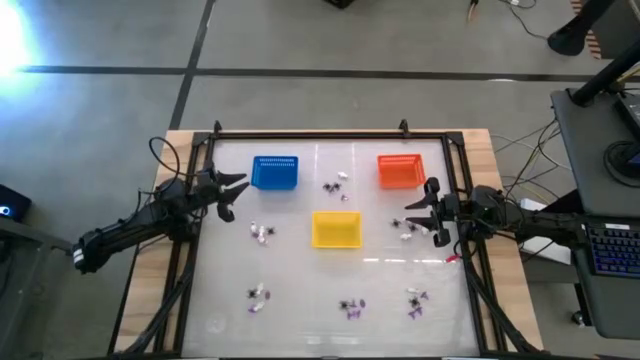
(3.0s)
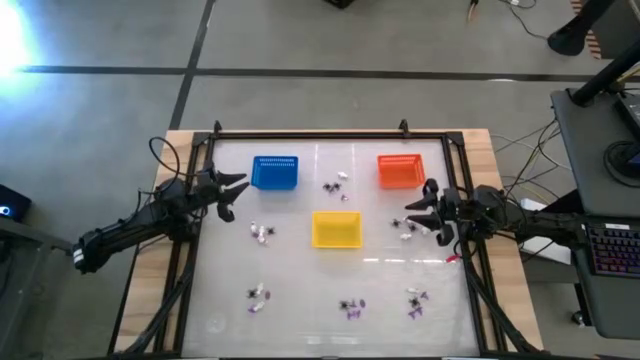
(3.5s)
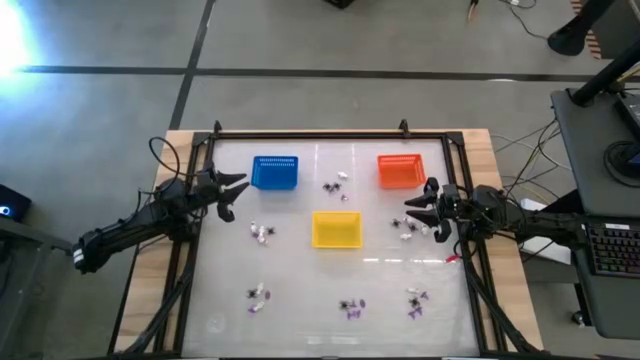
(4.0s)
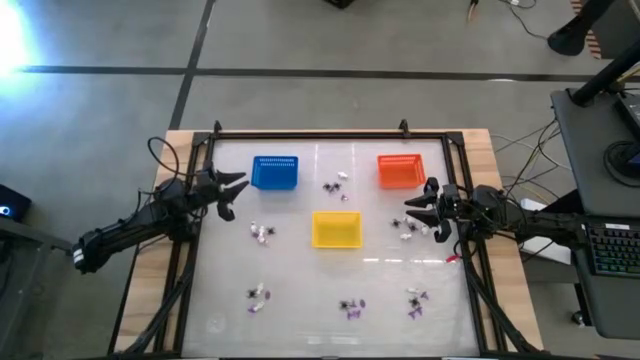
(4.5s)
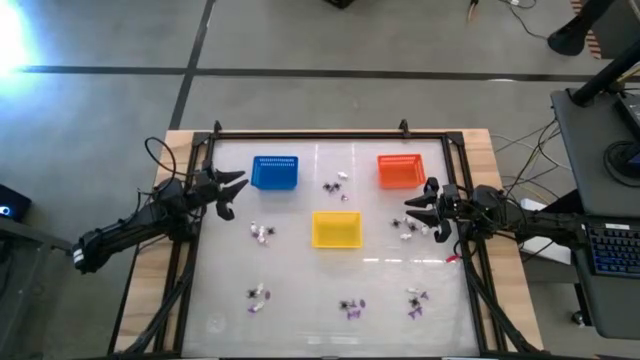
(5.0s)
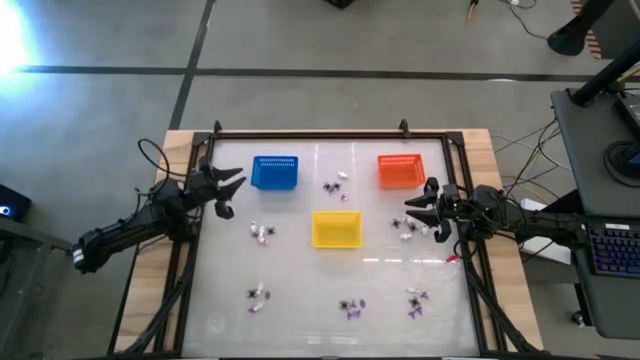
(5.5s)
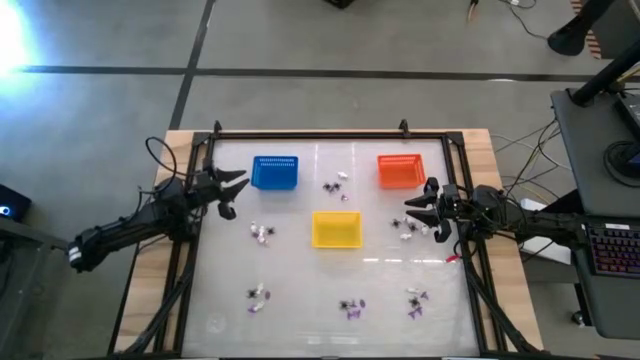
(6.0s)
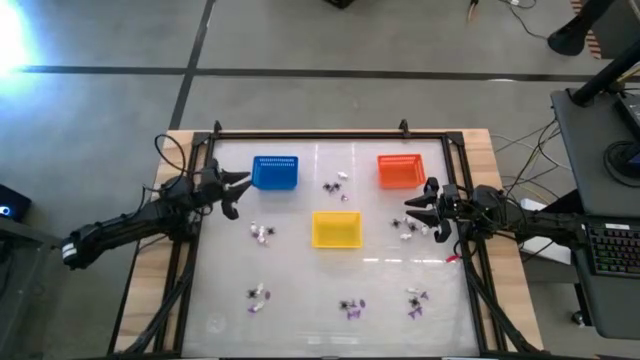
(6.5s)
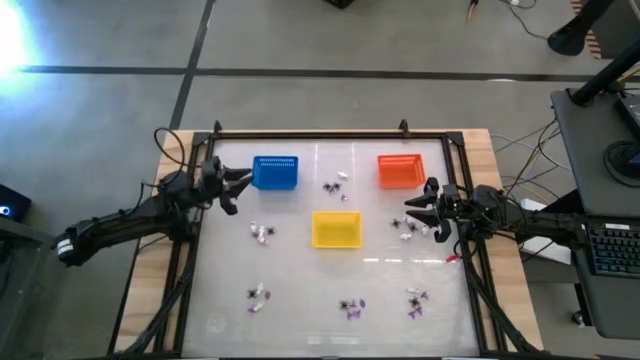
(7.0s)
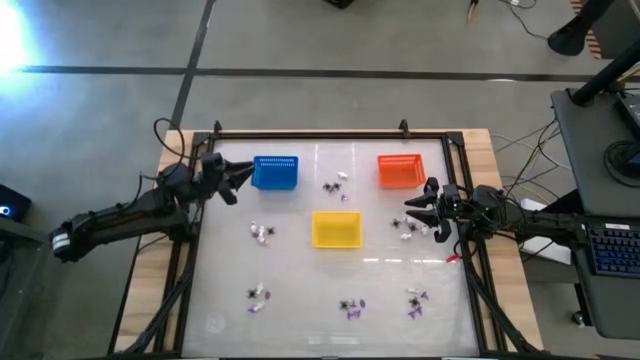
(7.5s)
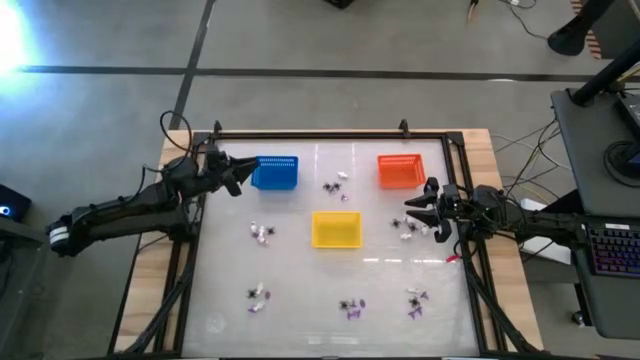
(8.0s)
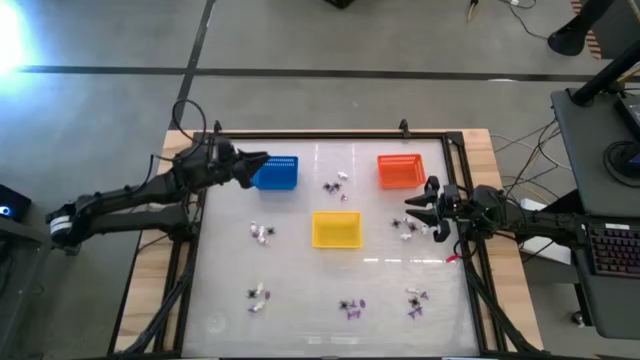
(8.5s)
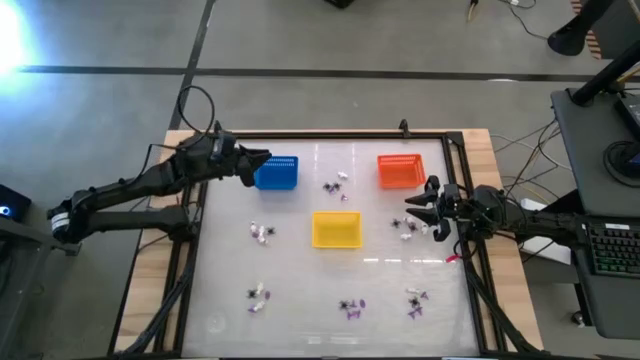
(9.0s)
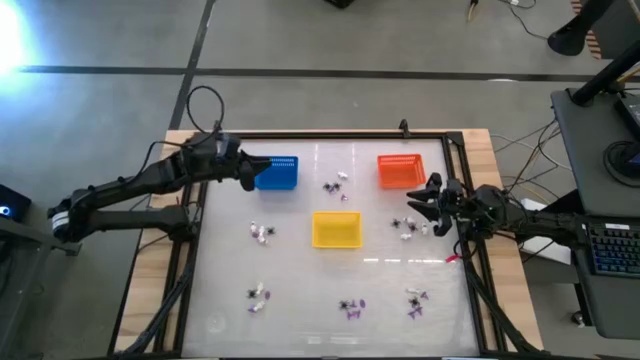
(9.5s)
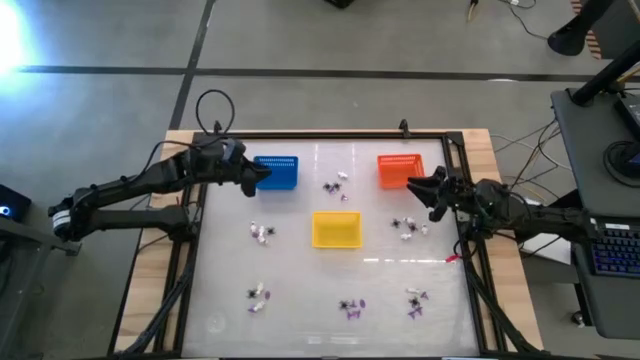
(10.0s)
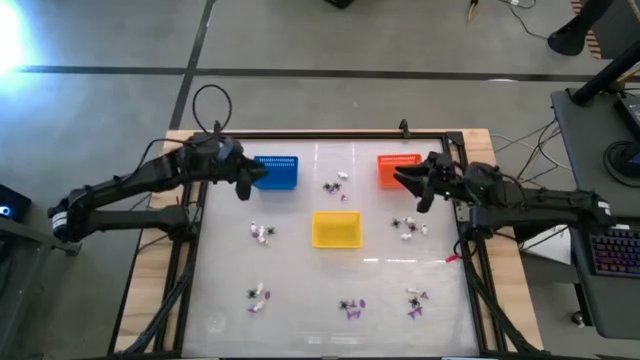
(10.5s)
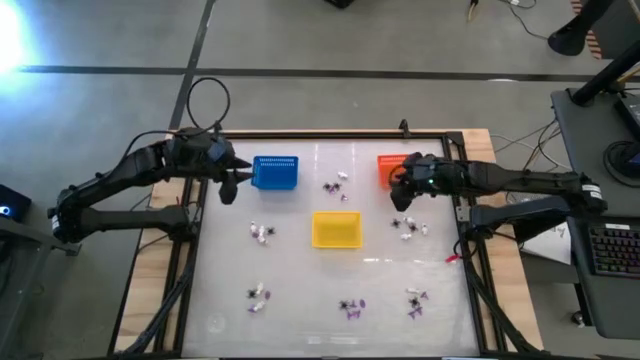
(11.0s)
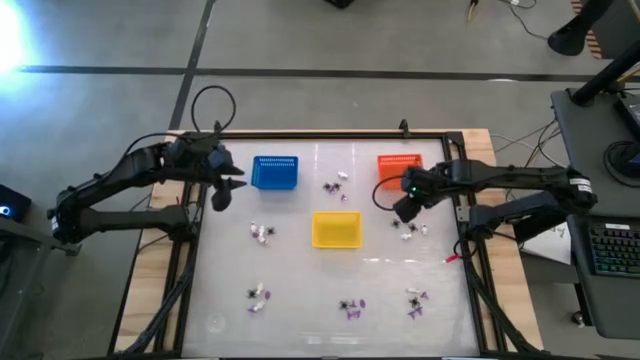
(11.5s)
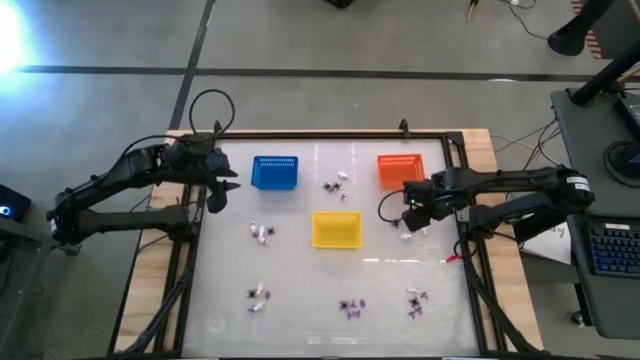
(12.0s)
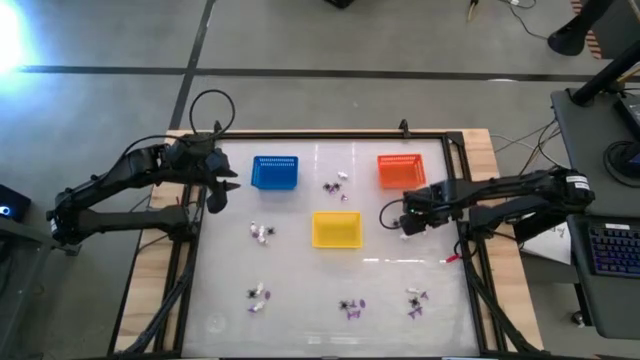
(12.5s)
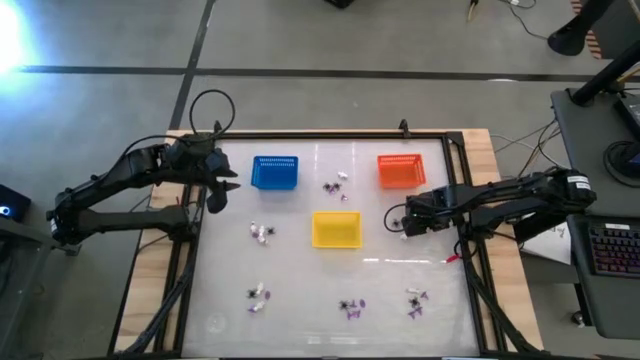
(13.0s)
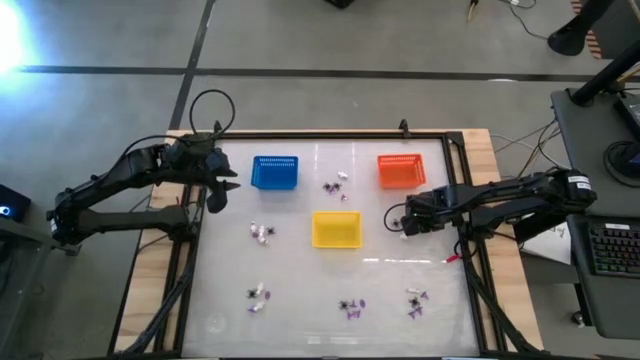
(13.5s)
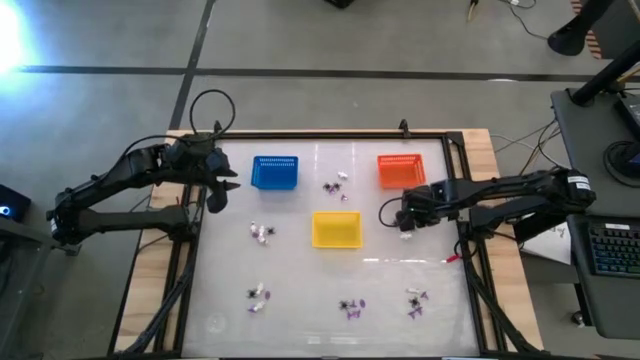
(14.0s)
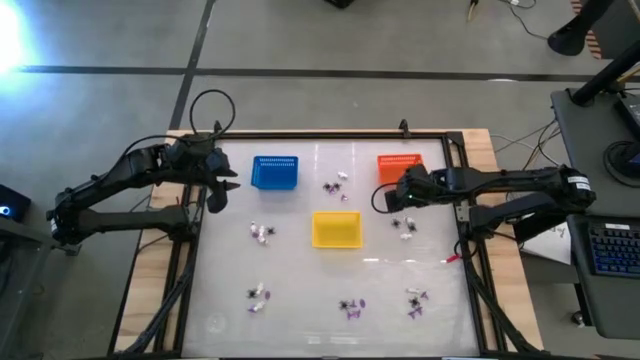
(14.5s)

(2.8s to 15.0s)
Task: Sort Halloween decoration
Put the white skeleton toy into the orange bin

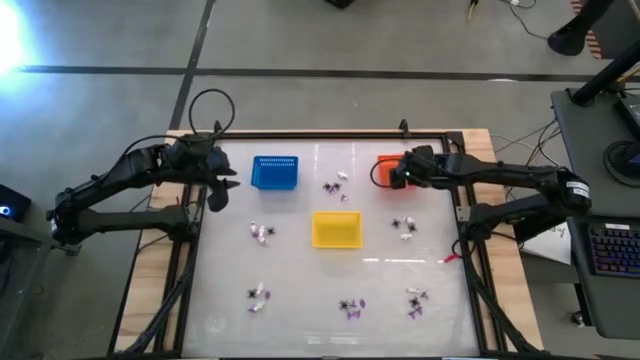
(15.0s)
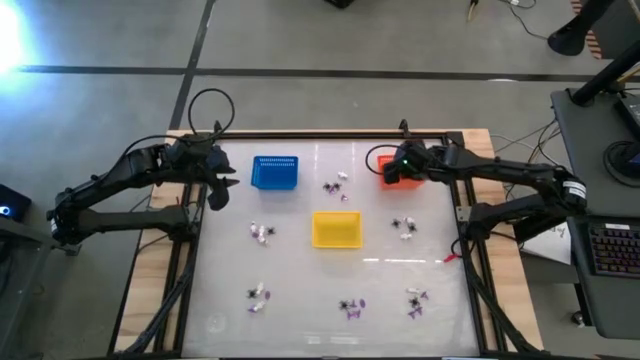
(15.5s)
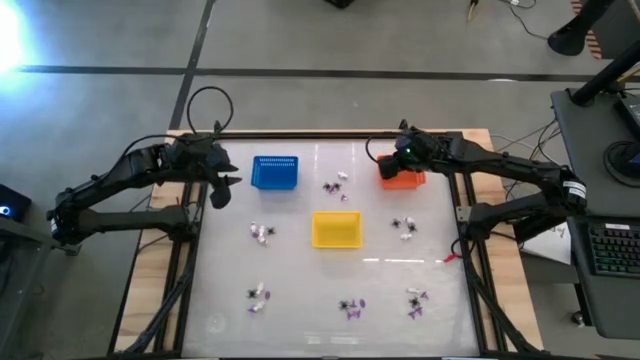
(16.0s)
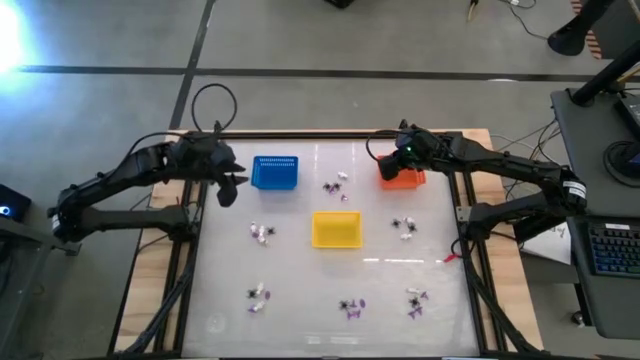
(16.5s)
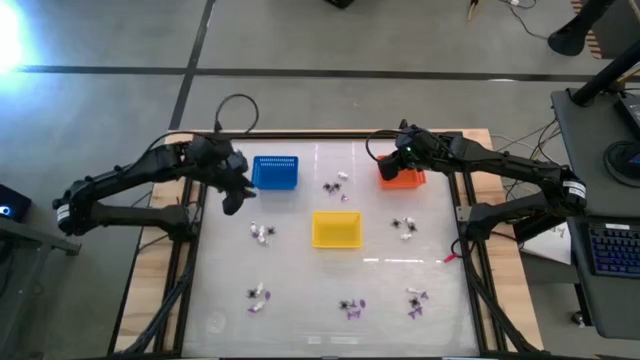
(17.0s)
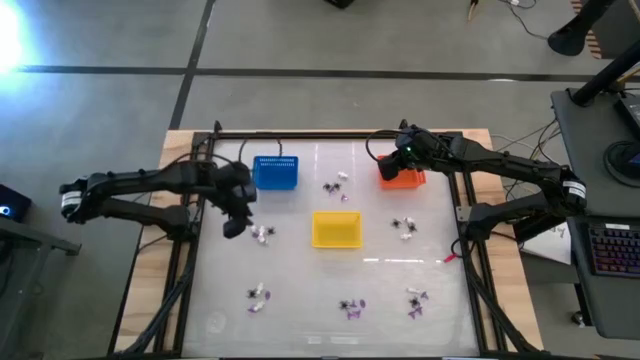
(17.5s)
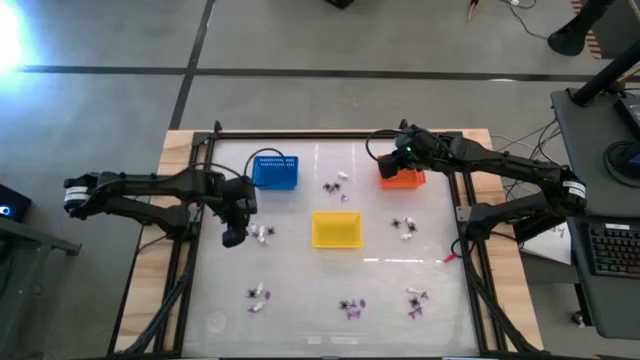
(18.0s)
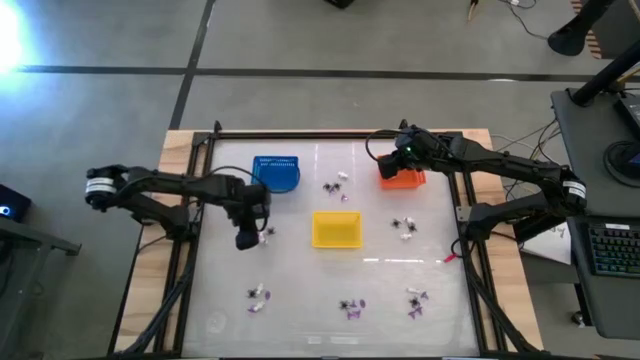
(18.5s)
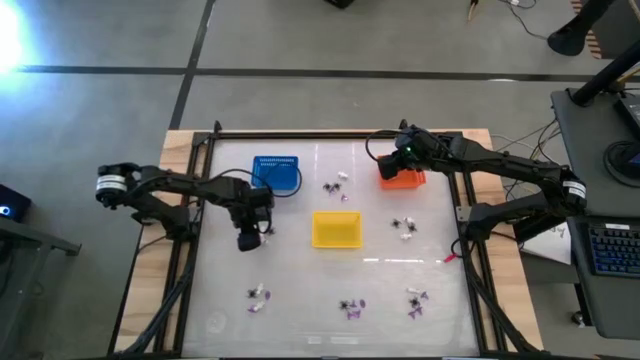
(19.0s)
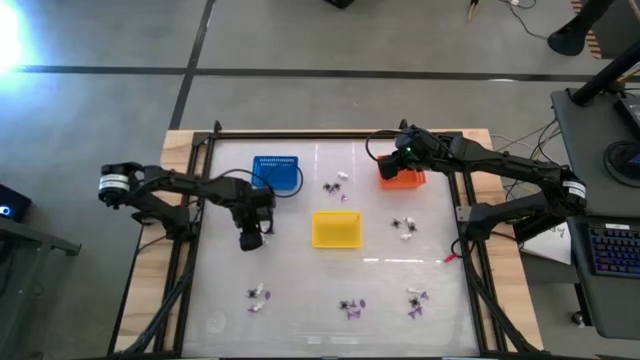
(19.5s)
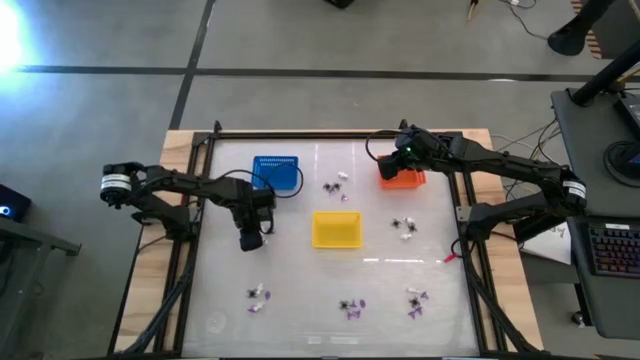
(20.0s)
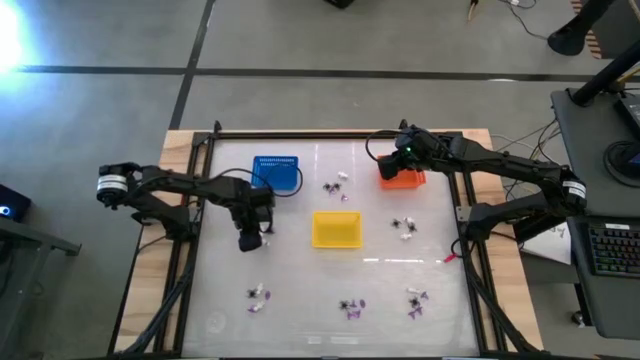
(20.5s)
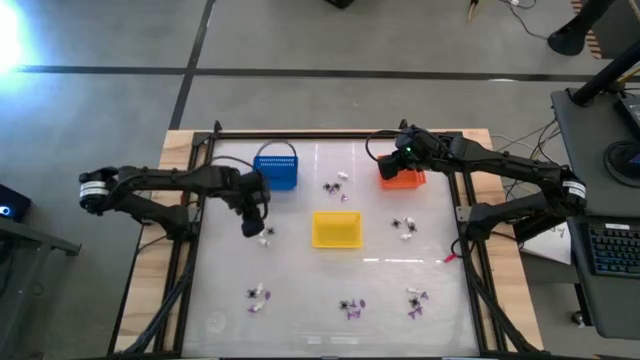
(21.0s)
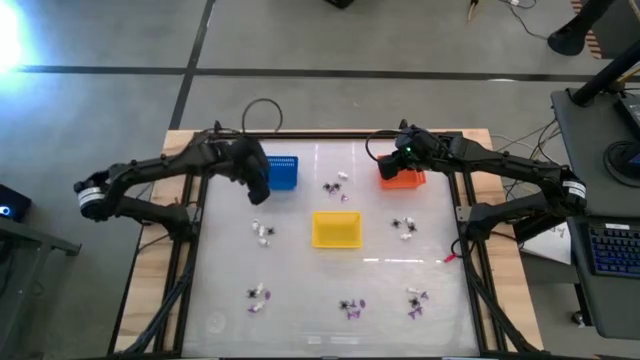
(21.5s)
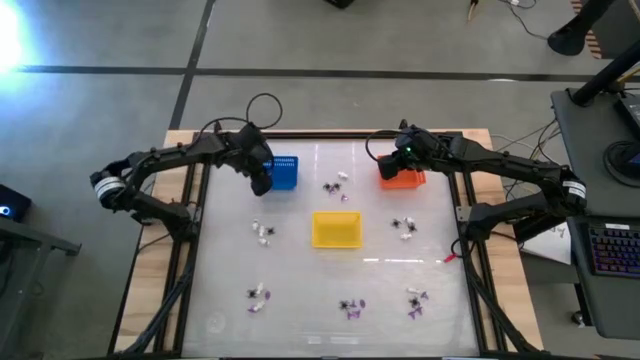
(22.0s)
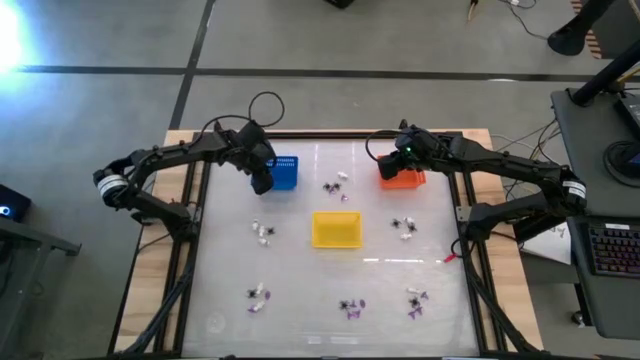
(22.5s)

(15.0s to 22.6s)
Put the purple witch hat toy into the blue bin

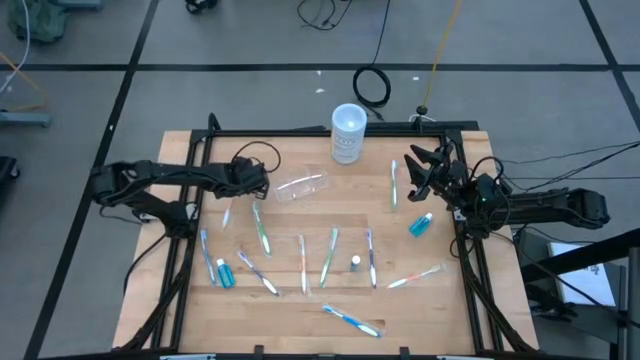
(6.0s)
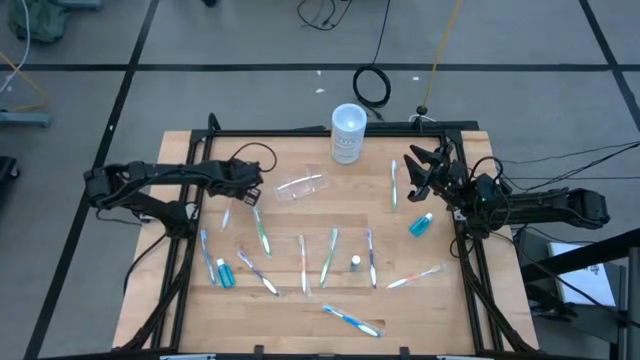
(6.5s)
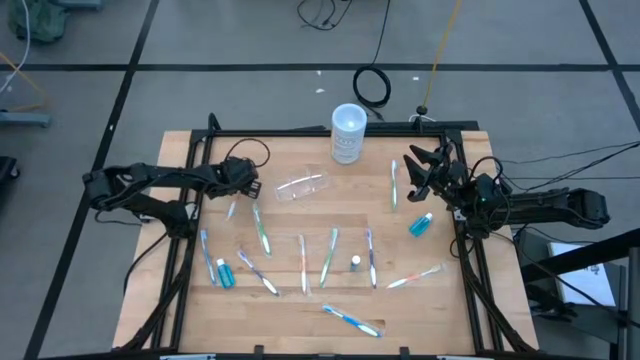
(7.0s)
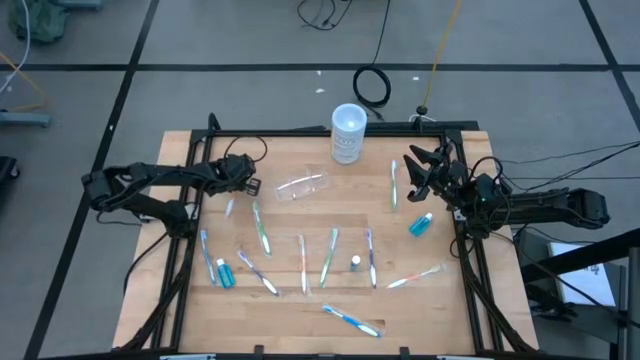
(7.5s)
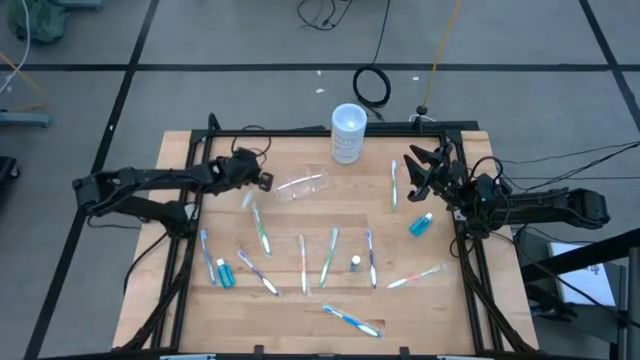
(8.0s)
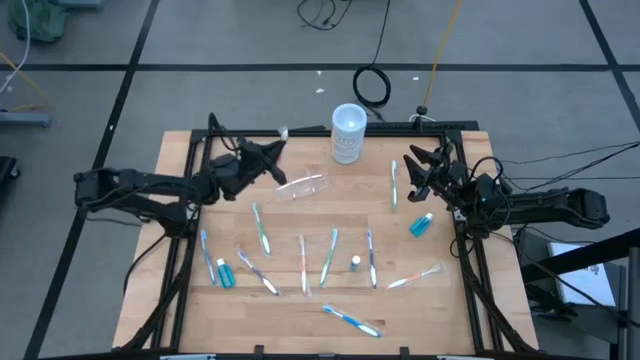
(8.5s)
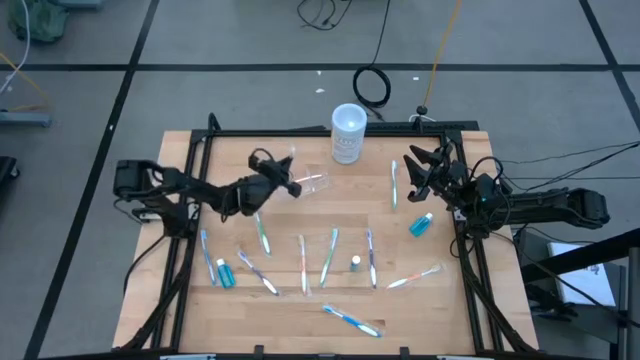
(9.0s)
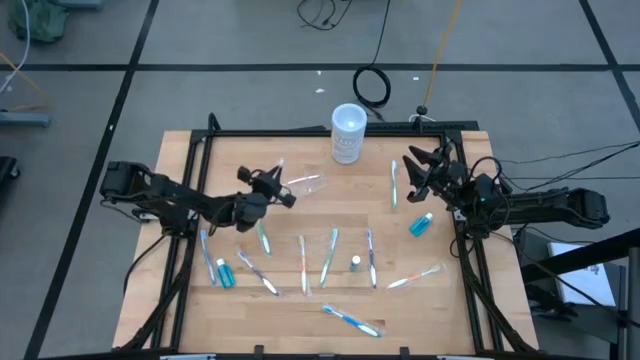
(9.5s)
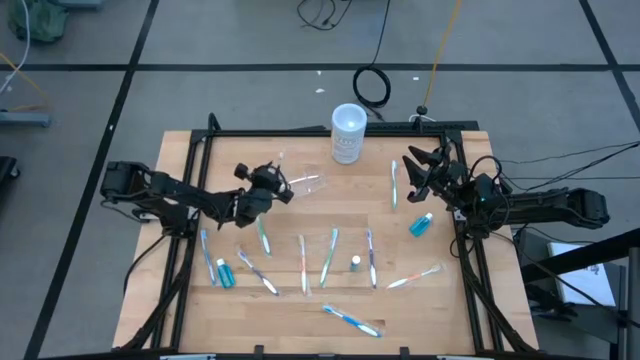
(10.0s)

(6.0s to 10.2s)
Task: Pick & Place toothbrushing station
Put the top left orange toothbrush into the transparent organizer
